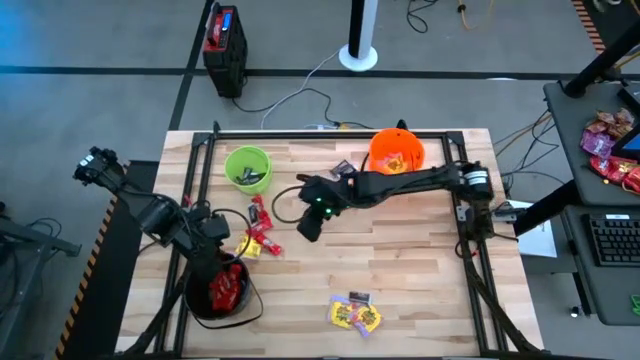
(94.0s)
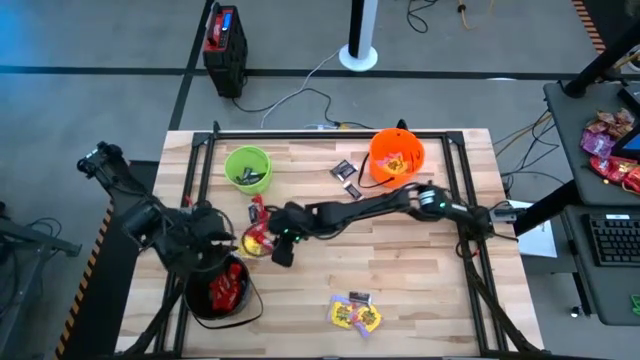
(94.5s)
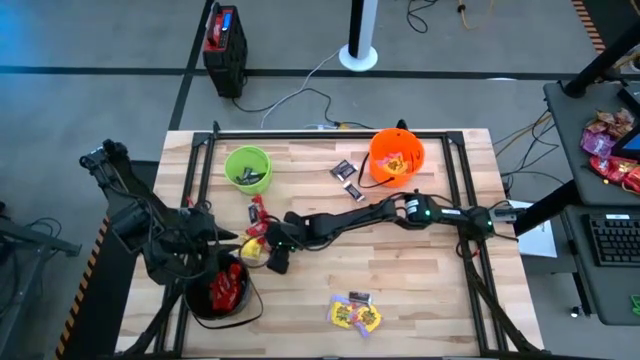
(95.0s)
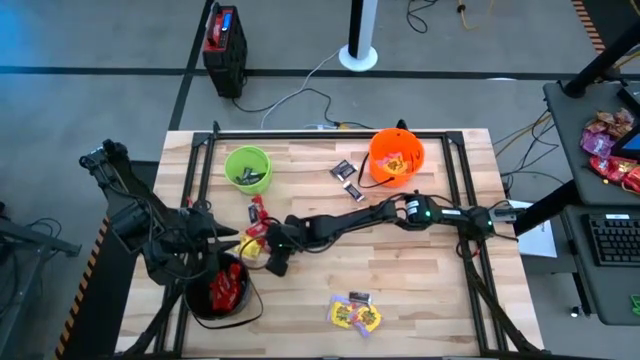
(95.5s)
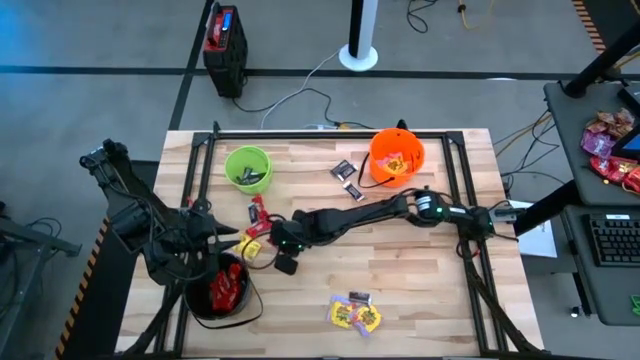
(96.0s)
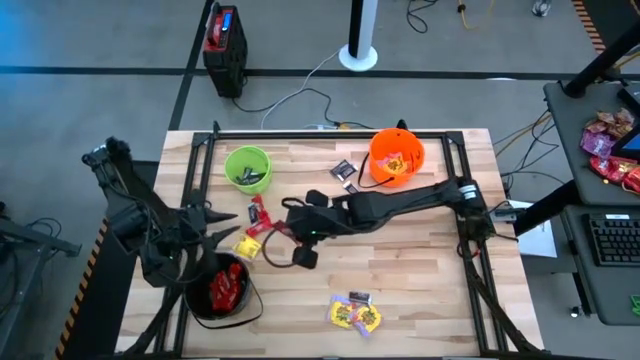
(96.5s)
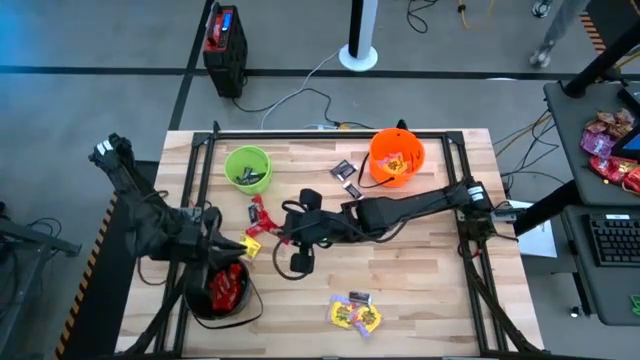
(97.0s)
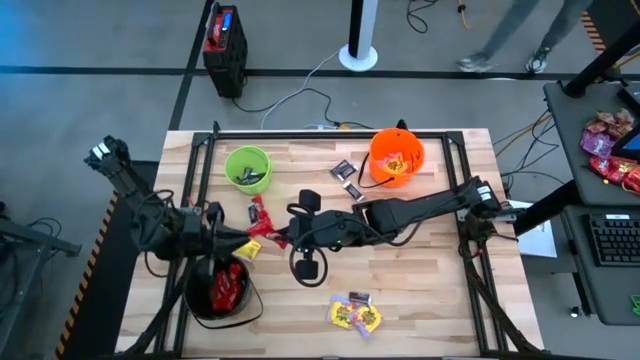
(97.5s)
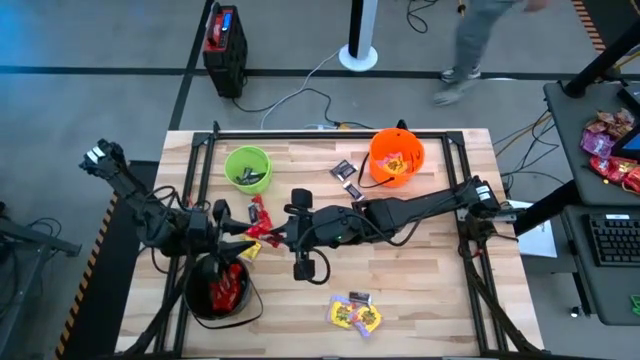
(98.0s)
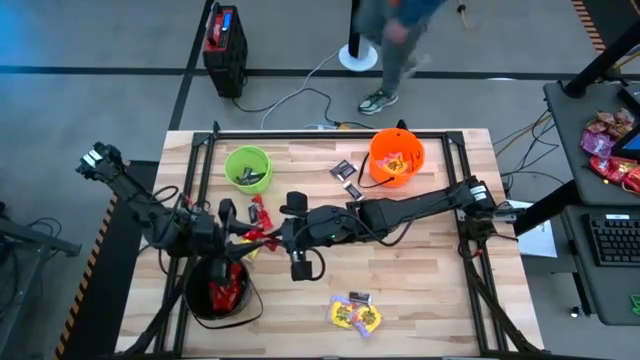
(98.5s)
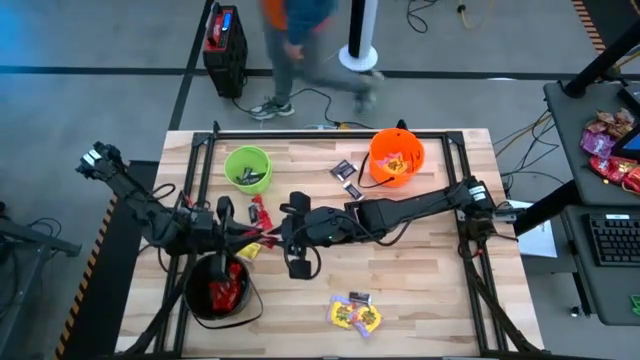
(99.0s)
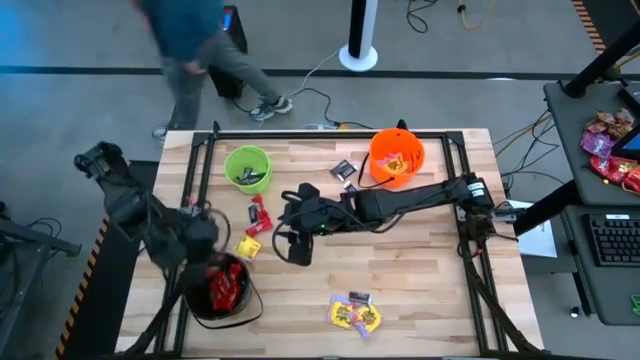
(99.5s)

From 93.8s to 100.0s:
Task: Sort candy by brand, put in halloween buckets
Put the red candy into the black bucket

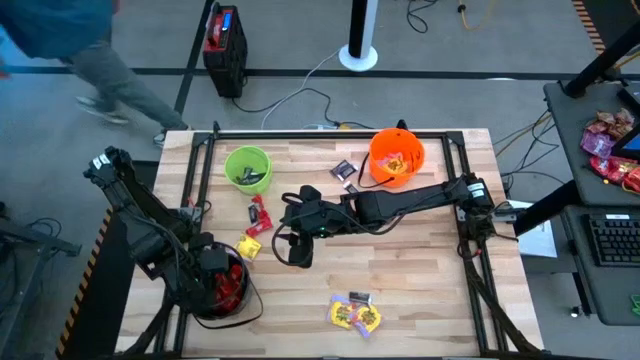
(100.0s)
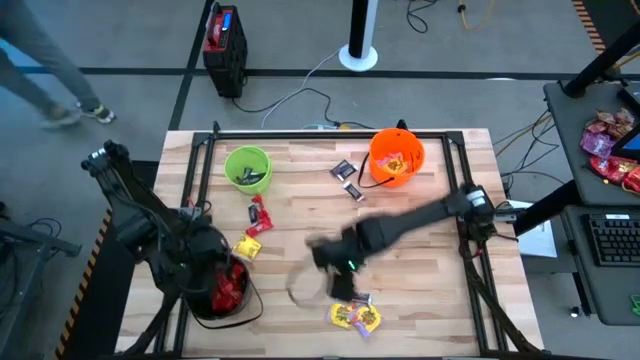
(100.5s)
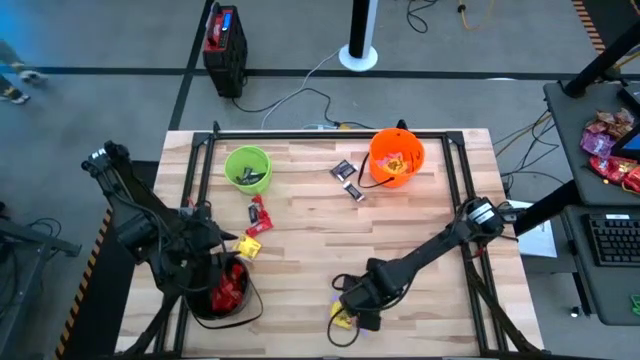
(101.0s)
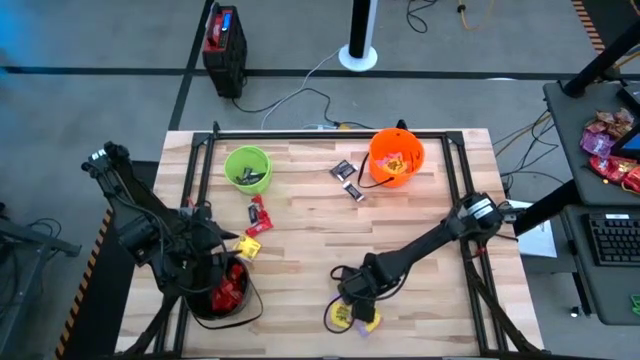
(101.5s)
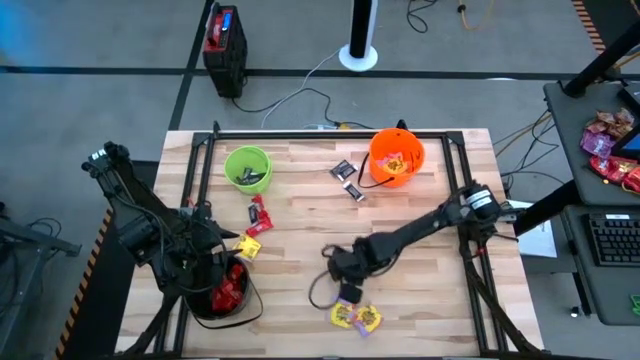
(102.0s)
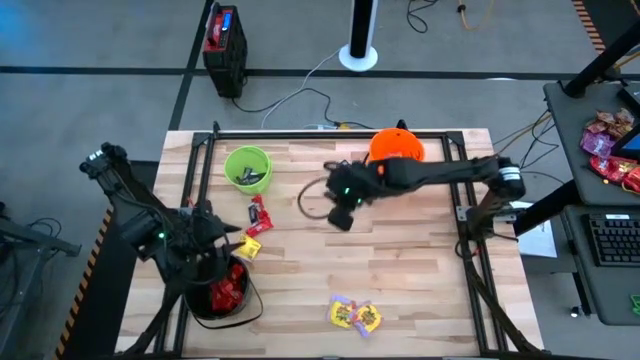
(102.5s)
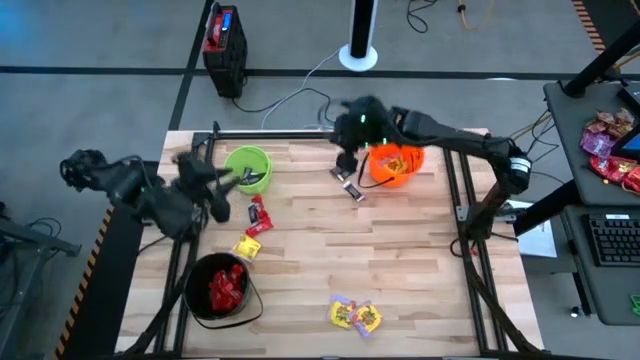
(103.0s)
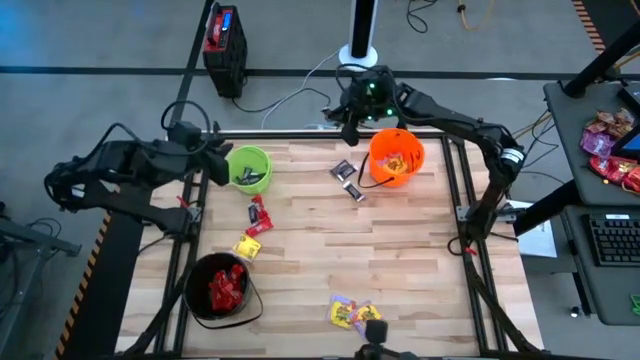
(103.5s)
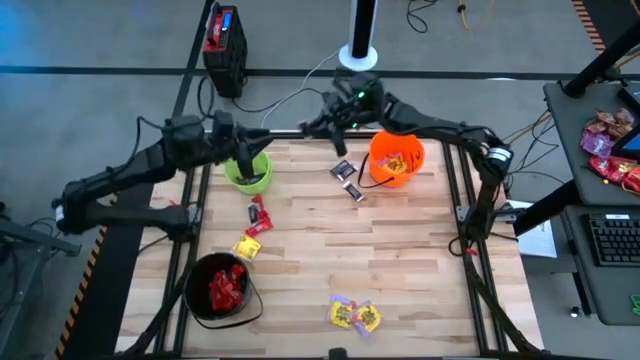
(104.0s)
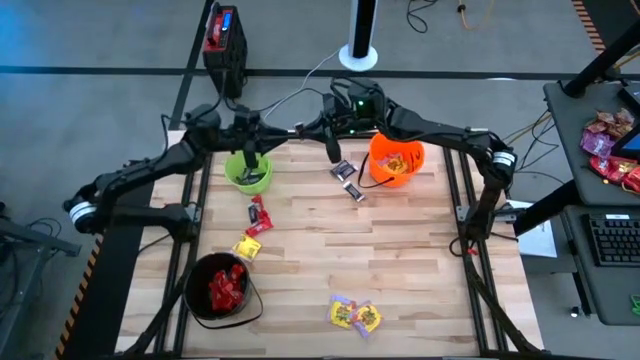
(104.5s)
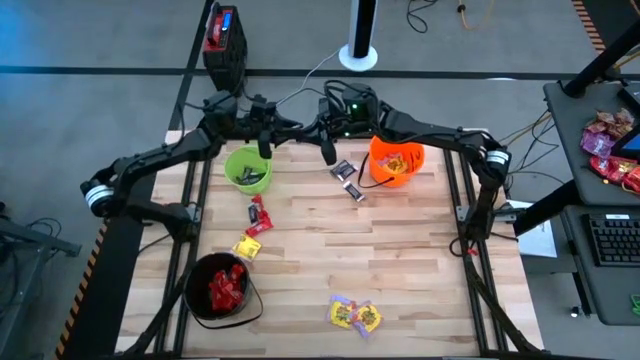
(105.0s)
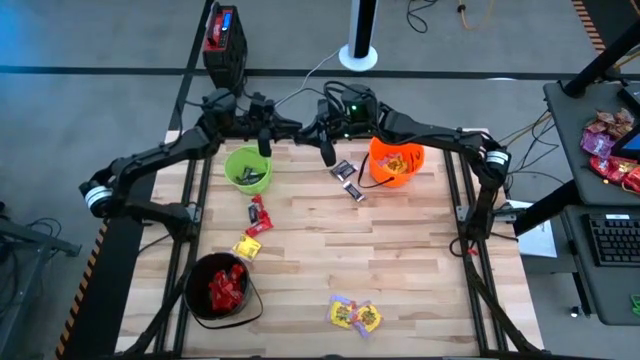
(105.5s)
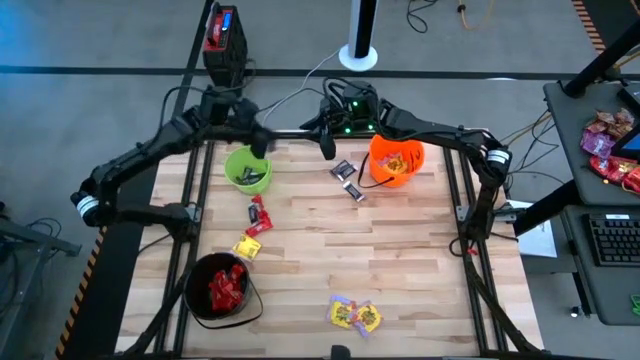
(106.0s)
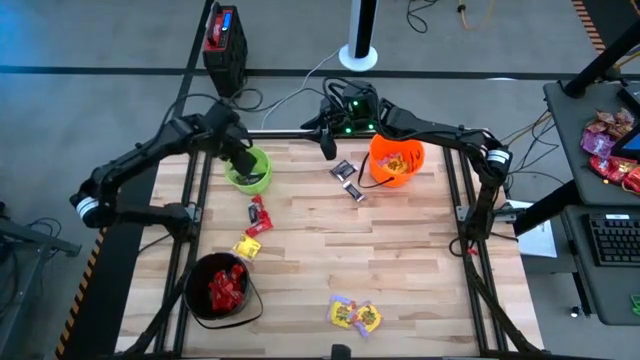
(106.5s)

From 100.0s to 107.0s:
Put the brown candy into the green bucket

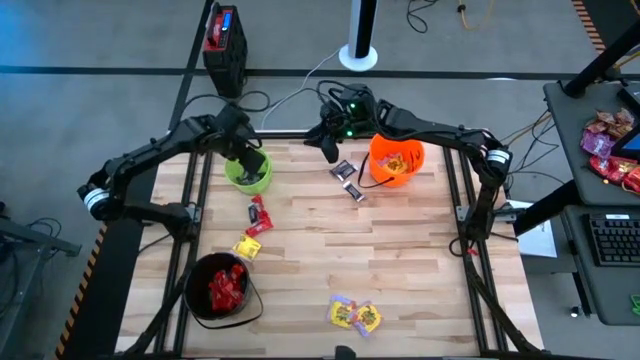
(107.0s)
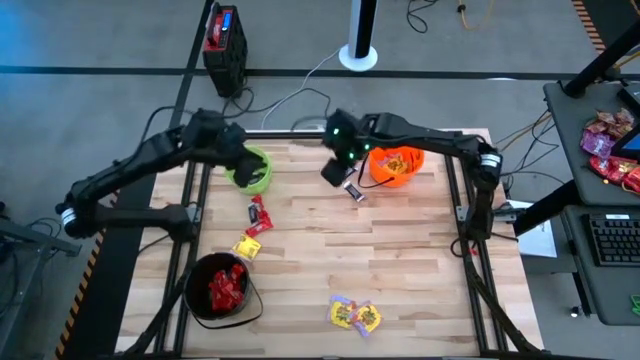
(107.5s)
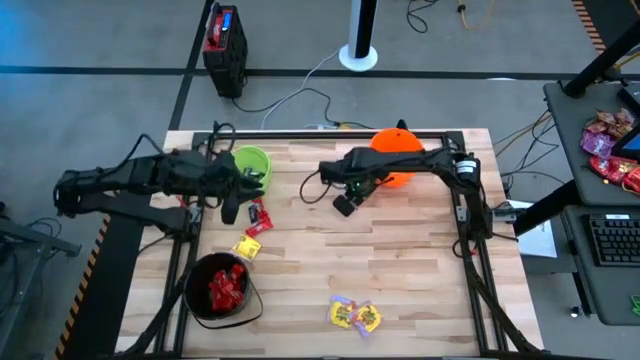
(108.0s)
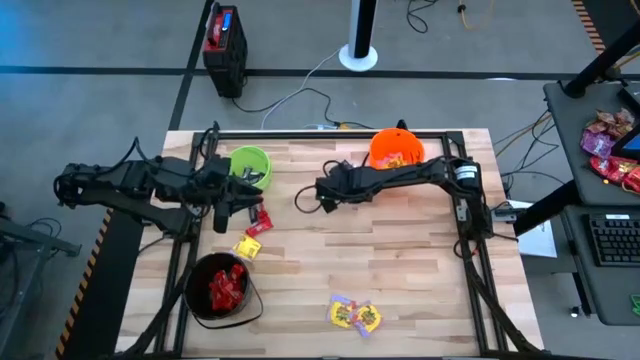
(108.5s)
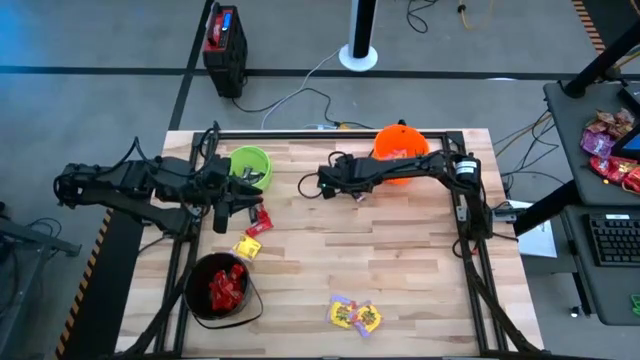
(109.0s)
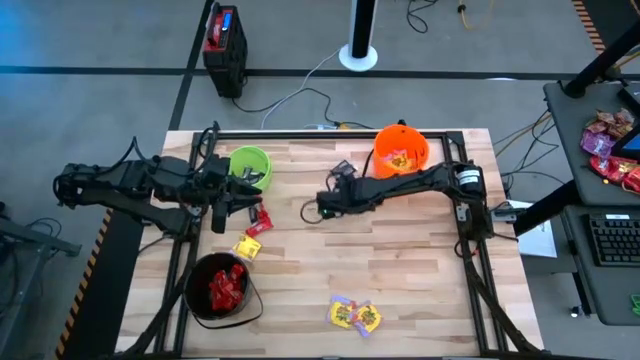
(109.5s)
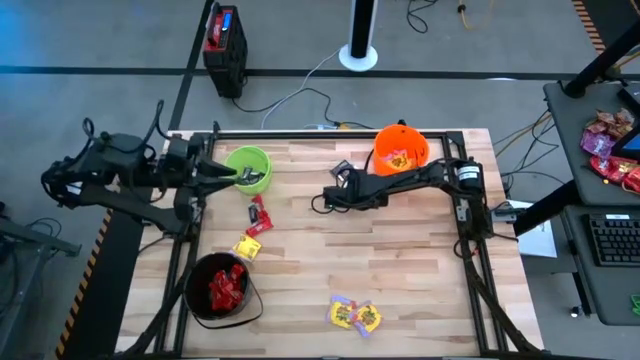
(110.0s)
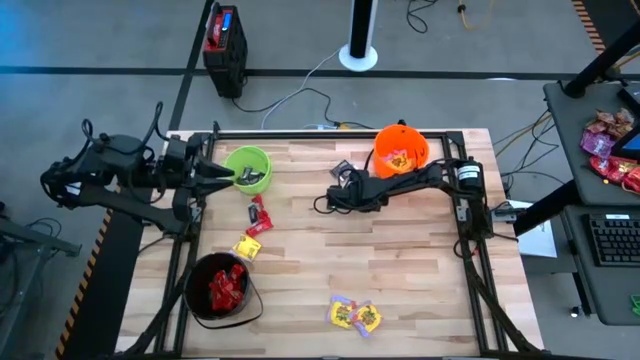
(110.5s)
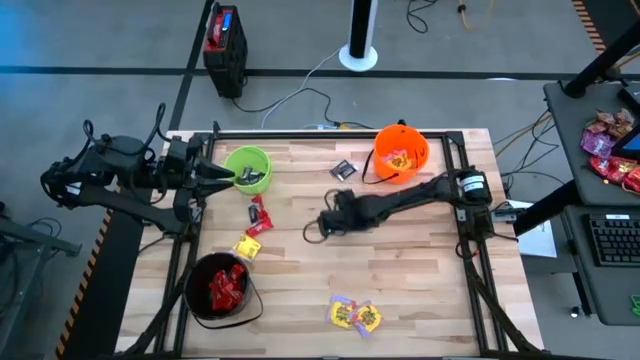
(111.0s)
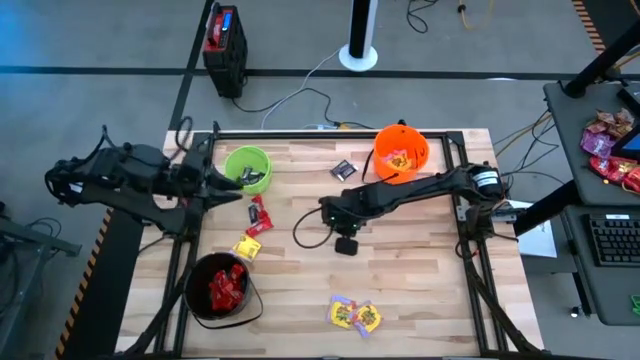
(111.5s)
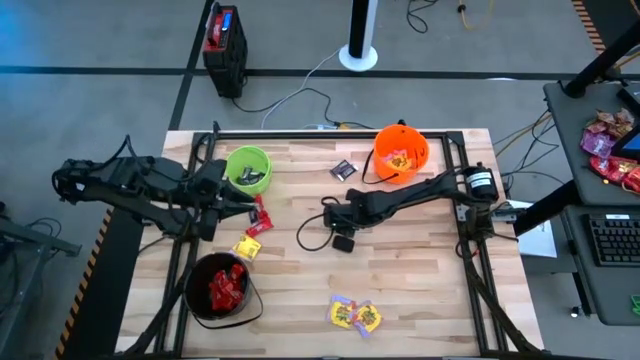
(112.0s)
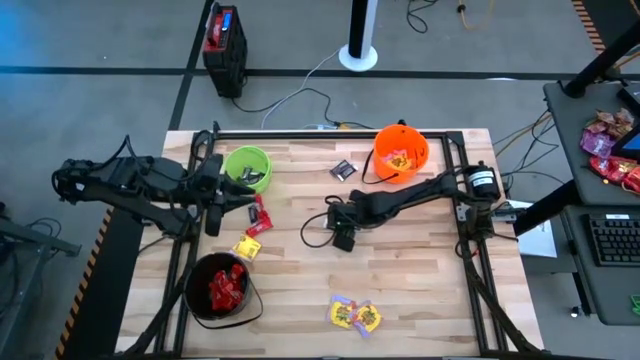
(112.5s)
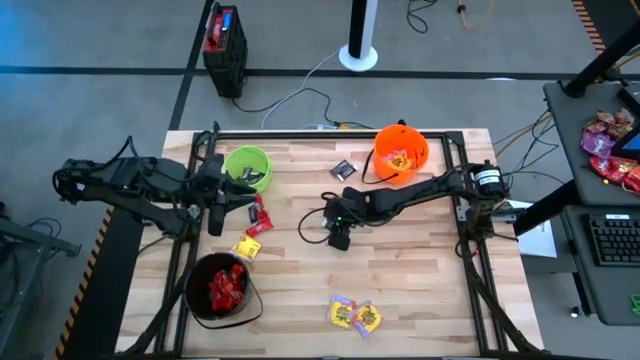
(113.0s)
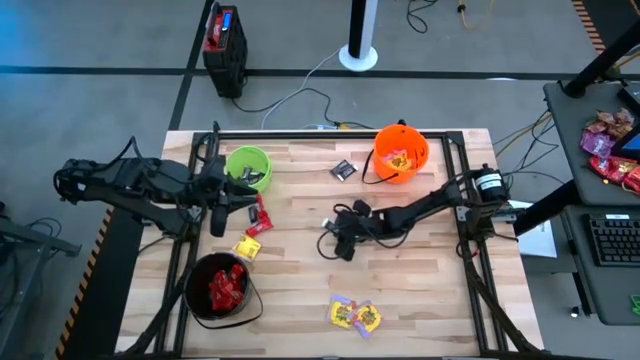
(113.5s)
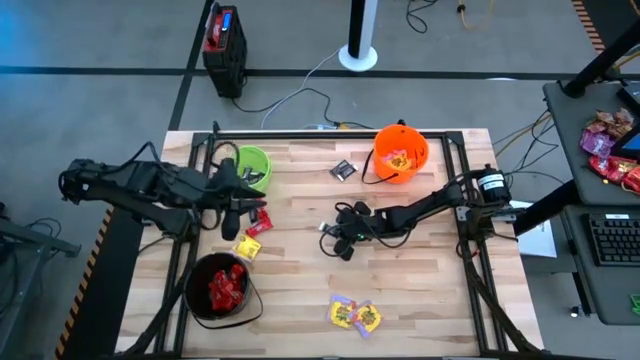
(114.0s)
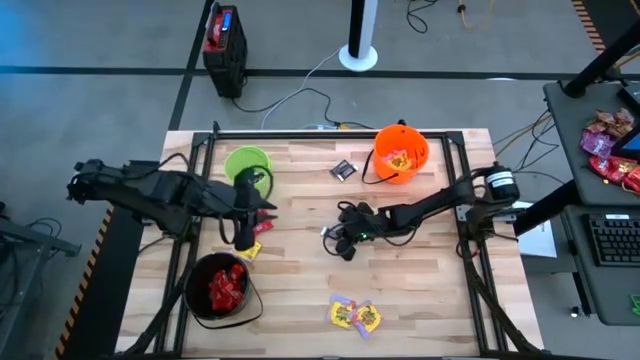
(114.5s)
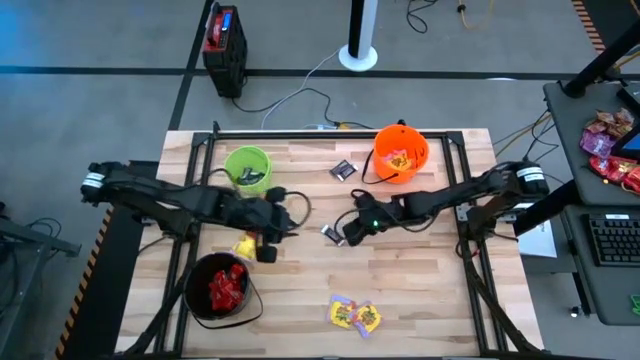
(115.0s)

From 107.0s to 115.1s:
Put the brown candy into the green bucket
